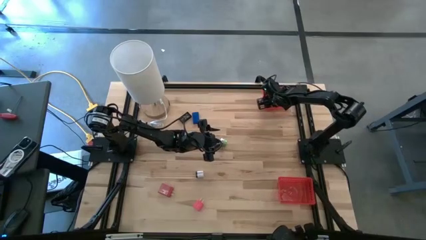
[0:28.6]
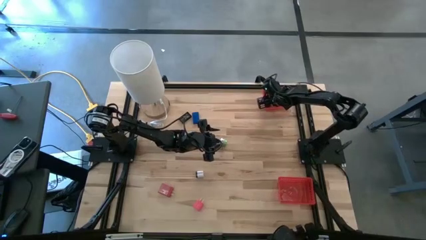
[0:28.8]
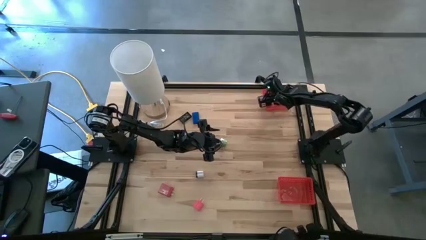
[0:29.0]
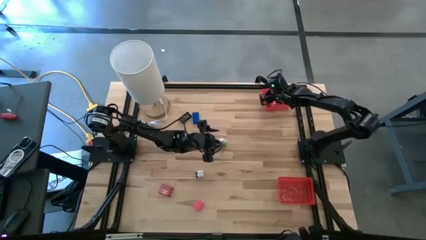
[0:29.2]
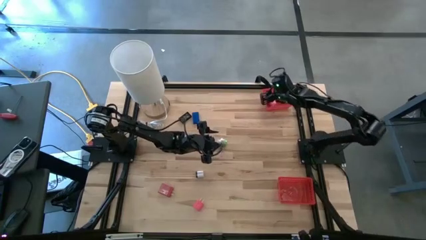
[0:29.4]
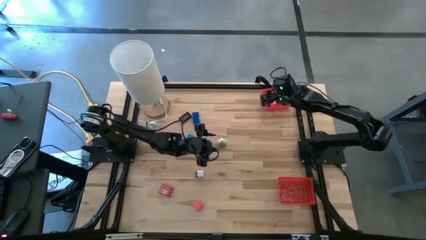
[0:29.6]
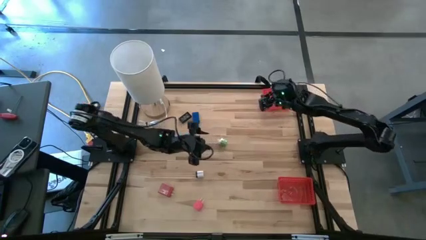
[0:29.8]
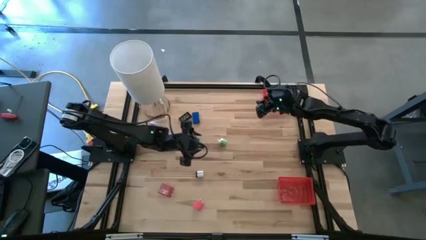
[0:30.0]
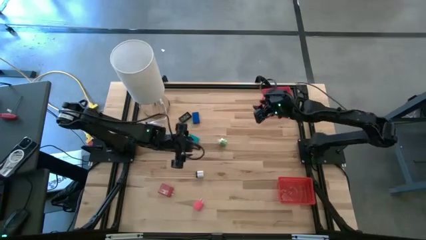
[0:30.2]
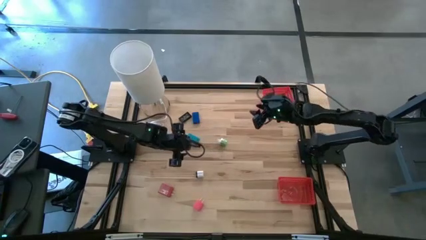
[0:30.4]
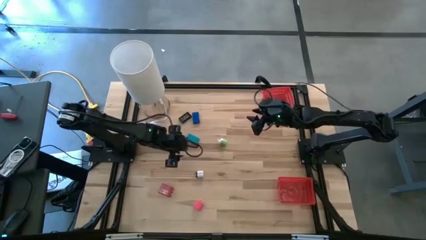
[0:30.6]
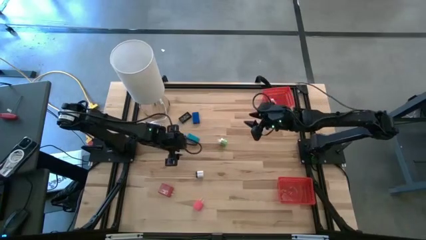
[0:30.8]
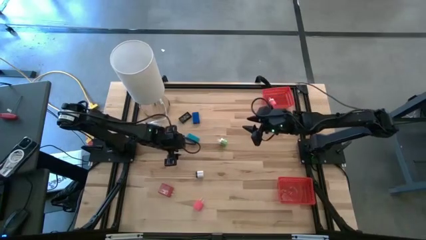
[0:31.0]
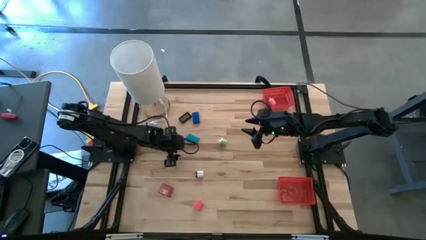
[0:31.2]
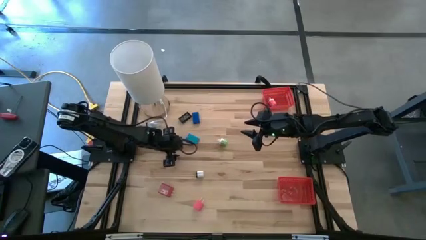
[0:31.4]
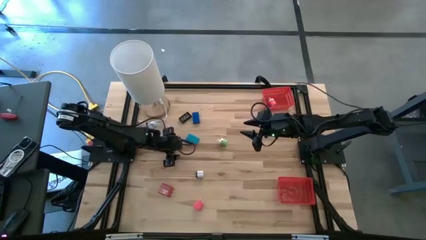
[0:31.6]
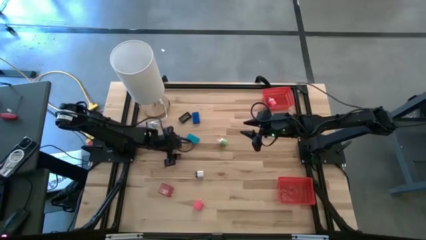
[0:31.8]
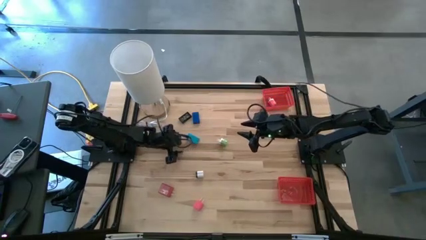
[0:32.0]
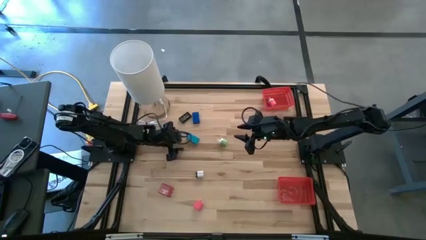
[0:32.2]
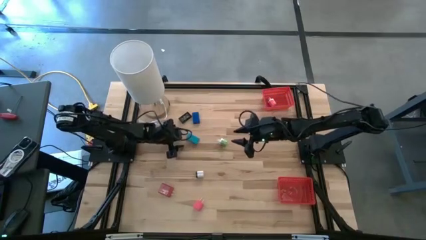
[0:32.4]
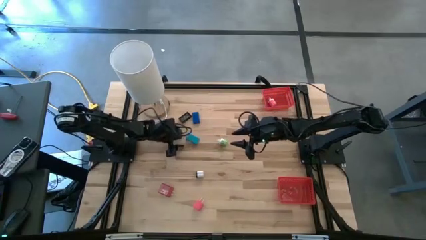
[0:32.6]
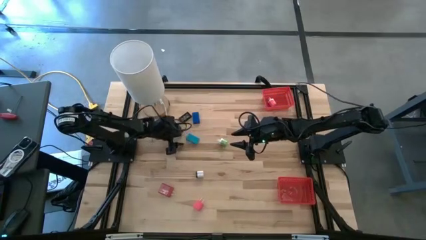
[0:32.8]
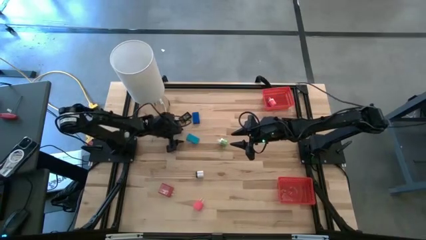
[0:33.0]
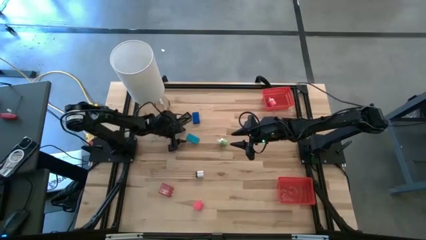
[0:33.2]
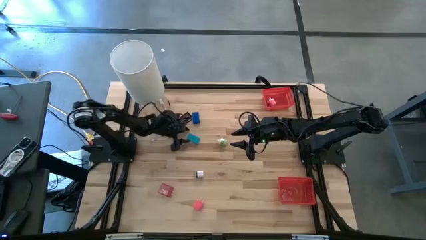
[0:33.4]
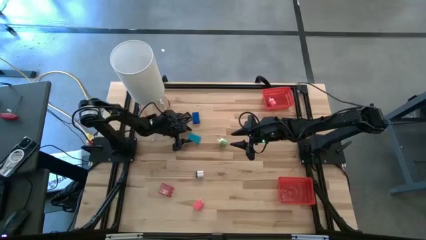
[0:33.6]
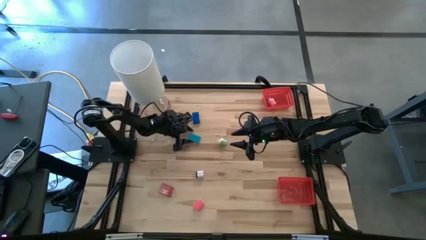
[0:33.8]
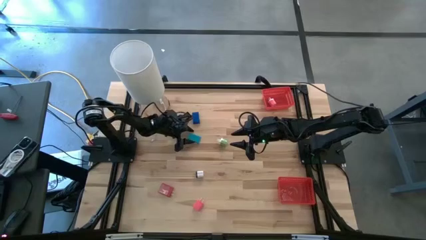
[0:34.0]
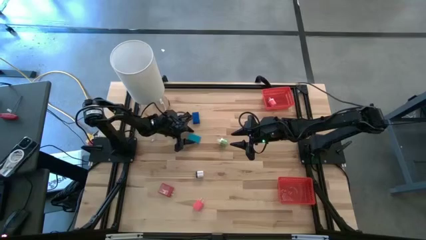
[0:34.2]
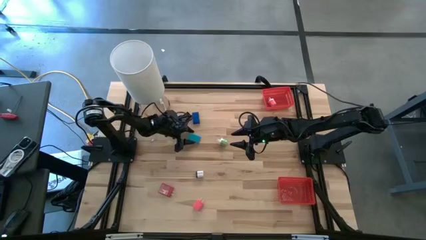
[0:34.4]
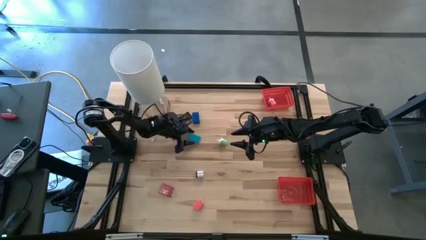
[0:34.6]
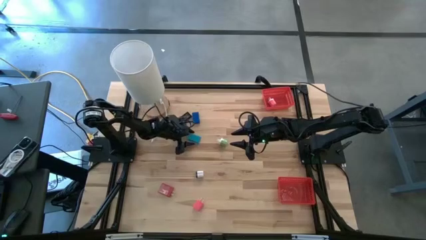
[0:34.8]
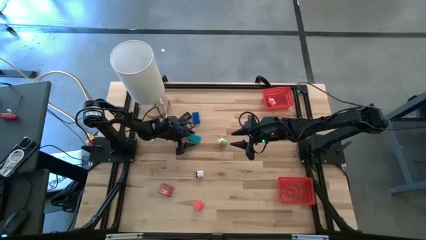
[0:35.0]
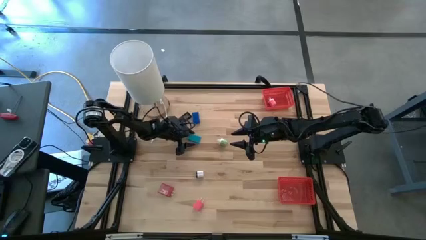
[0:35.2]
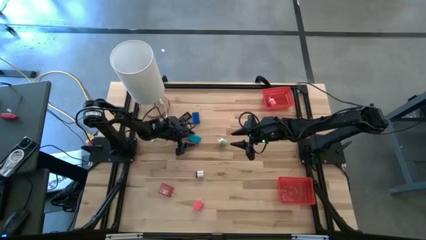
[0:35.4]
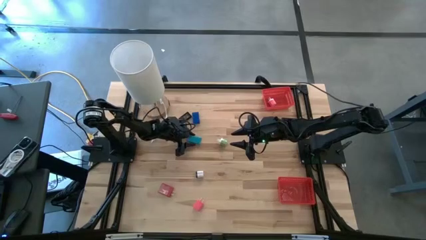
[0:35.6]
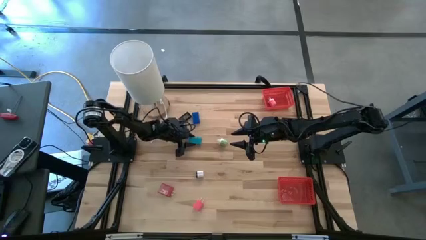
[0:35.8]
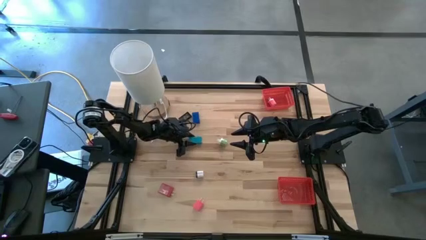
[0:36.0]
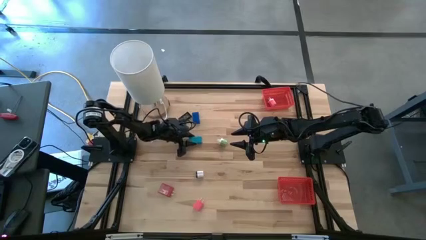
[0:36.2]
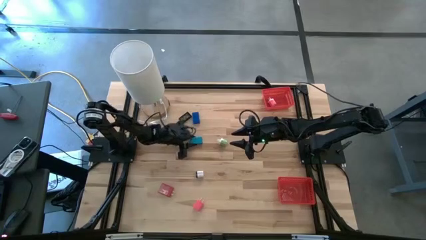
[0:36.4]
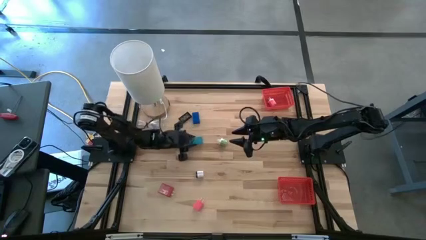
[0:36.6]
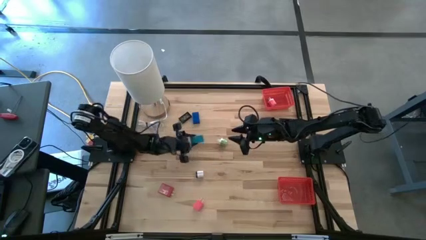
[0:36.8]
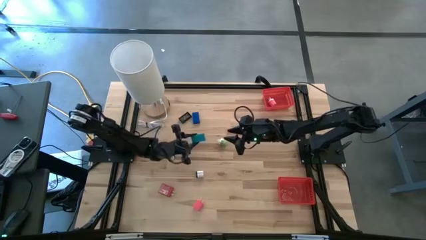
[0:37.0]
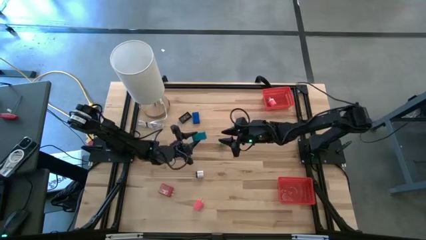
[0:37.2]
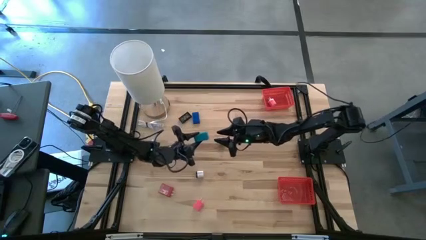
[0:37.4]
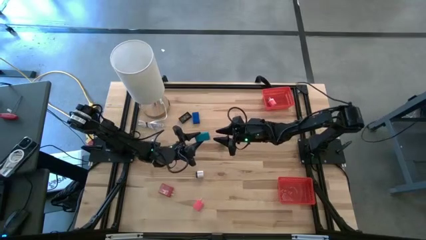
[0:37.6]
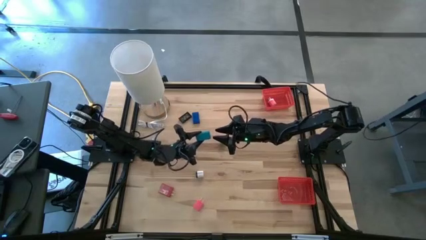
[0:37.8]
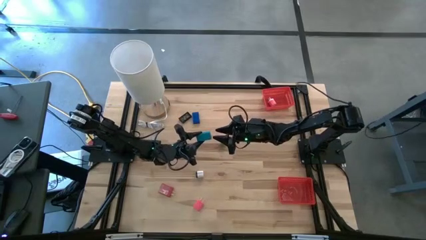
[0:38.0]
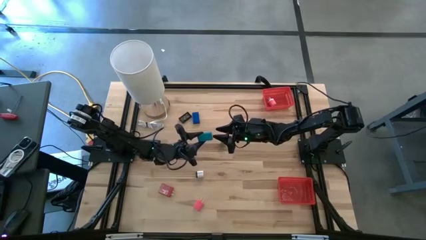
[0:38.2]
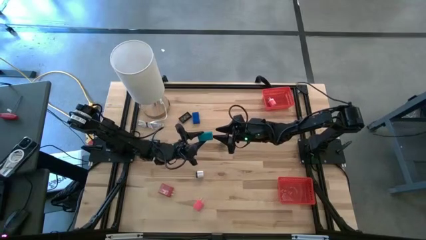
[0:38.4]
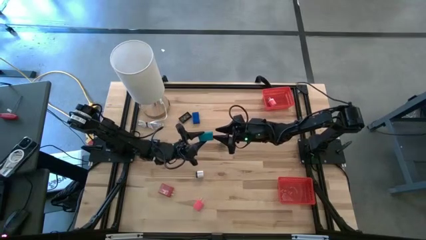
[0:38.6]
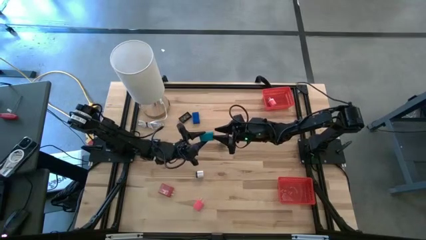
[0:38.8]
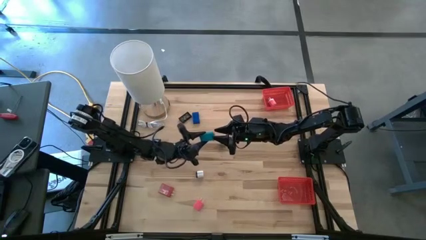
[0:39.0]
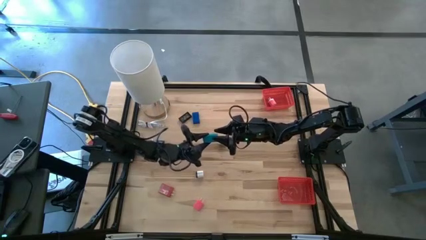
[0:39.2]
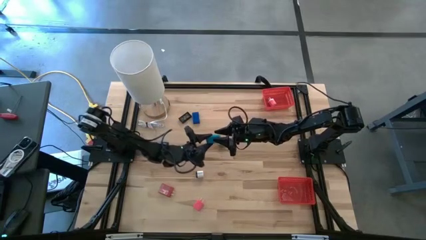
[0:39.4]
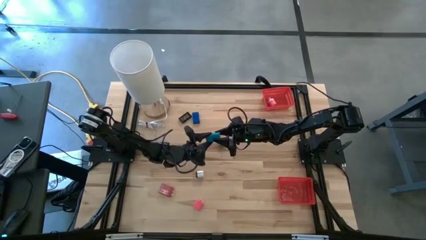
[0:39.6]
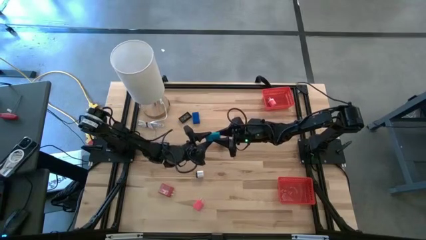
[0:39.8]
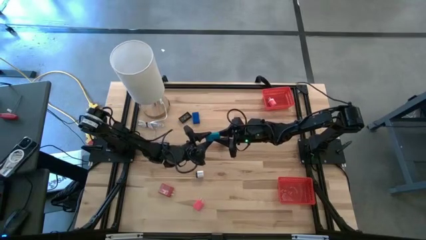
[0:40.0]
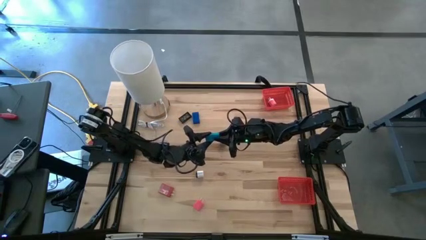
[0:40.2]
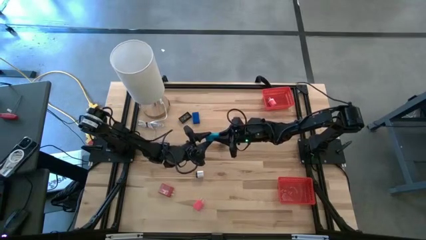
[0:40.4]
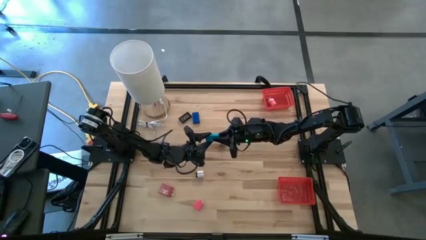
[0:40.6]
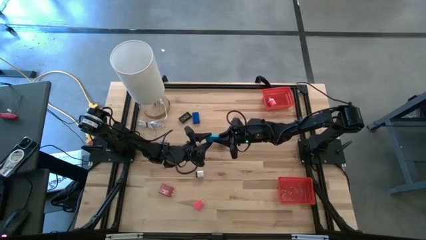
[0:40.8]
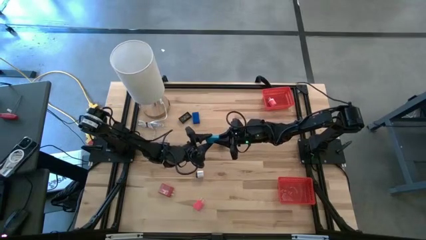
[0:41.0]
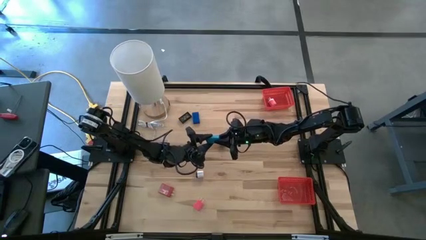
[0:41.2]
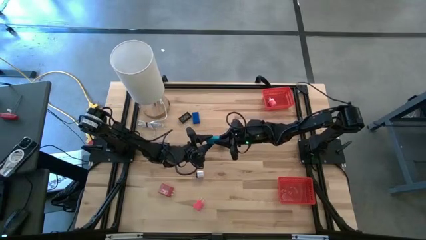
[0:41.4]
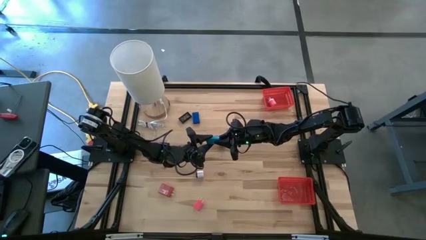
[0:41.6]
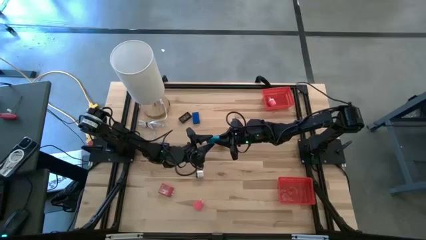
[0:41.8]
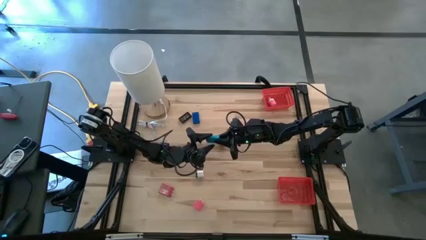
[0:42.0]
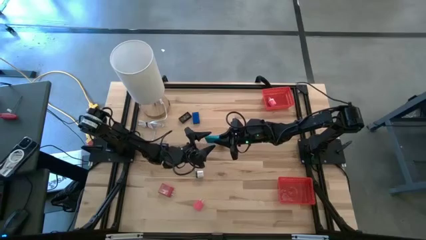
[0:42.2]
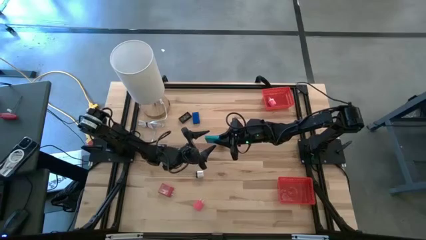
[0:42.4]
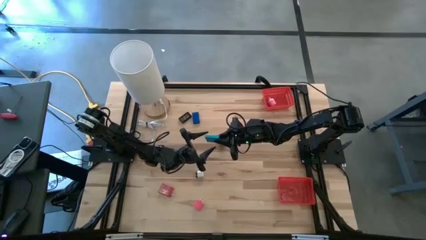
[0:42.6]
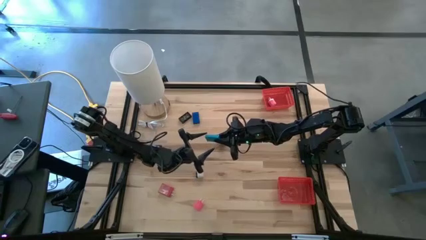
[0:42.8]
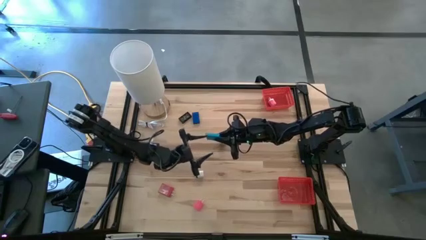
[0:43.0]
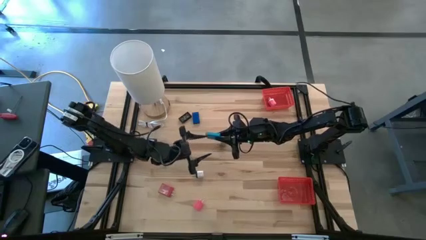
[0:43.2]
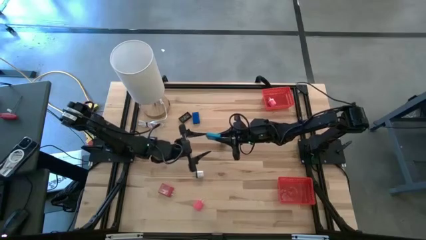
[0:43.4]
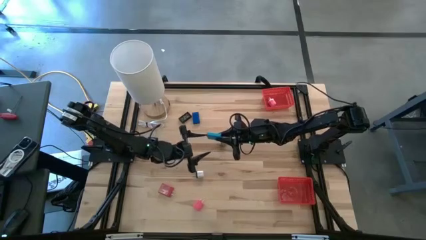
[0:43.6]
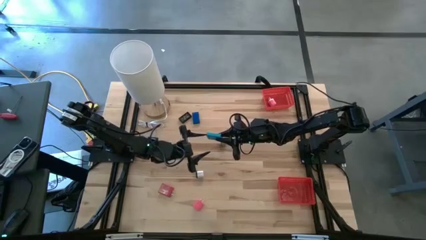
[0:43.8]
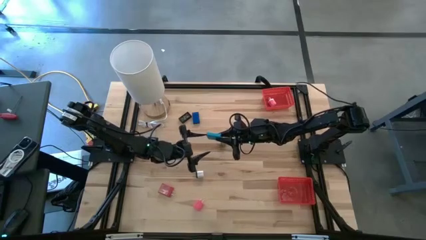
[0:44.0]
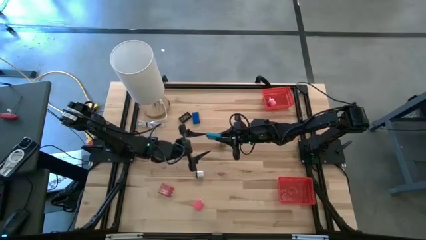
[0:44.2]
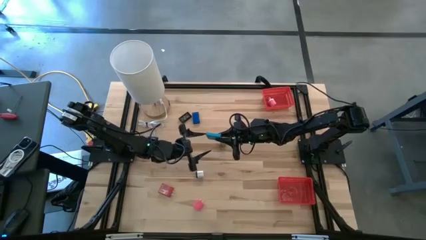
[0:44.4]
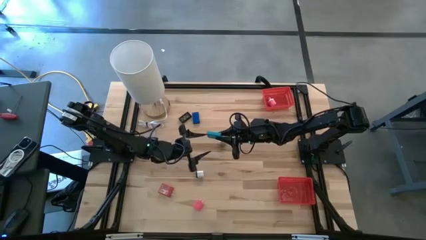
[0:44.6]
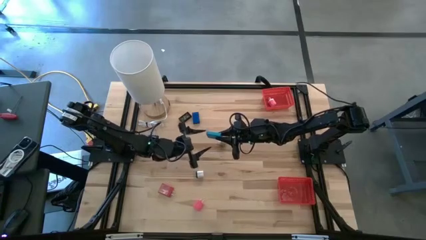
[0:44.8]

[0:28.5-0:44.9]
Task: Pick & Place Office items
Put the light blue digital clock into the bottom red basket
